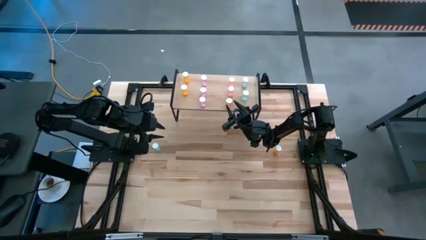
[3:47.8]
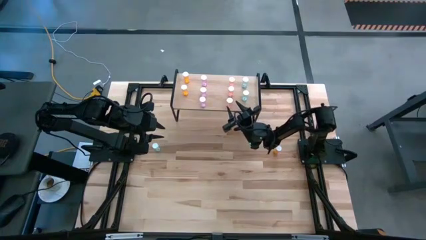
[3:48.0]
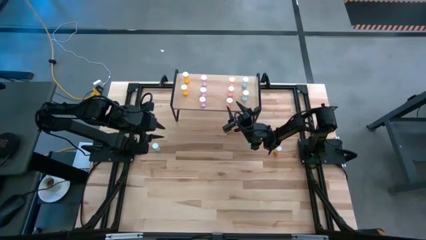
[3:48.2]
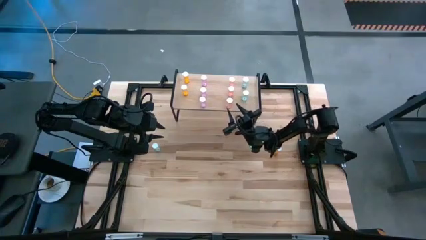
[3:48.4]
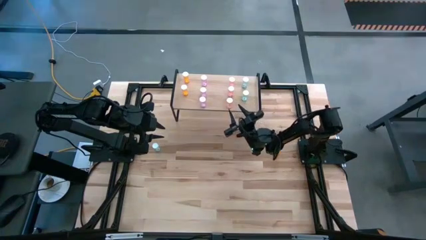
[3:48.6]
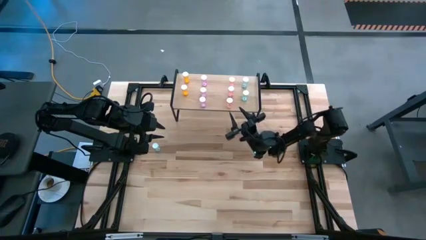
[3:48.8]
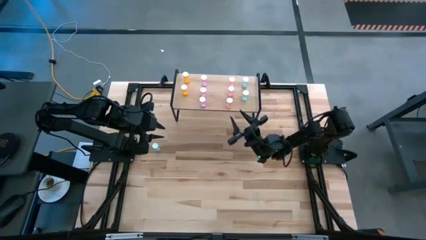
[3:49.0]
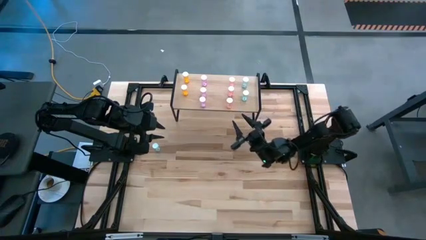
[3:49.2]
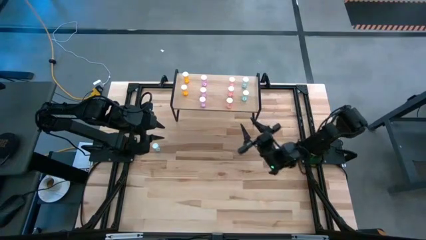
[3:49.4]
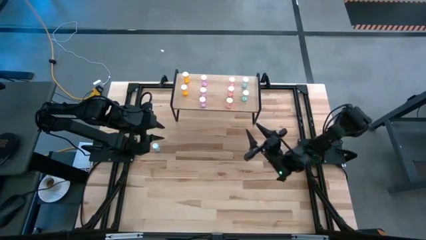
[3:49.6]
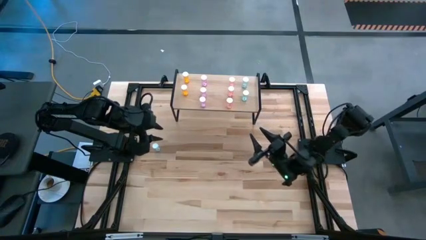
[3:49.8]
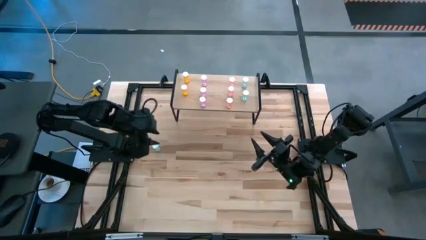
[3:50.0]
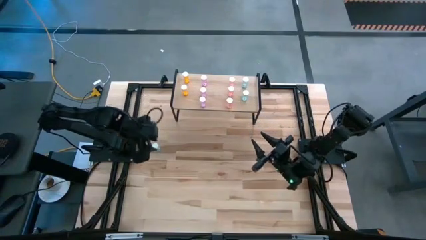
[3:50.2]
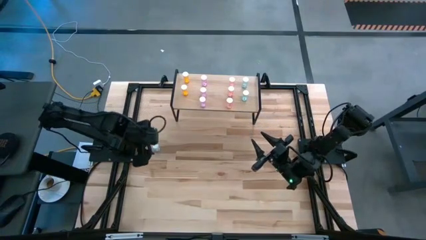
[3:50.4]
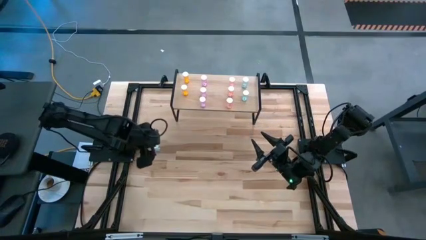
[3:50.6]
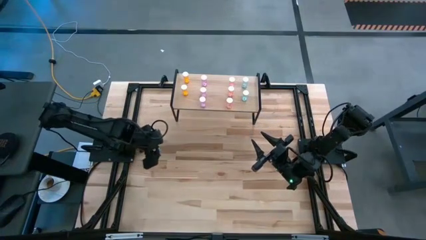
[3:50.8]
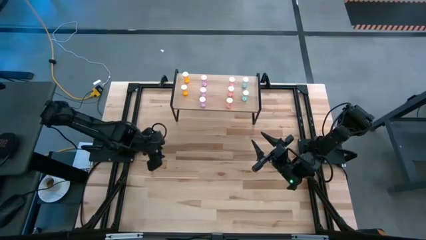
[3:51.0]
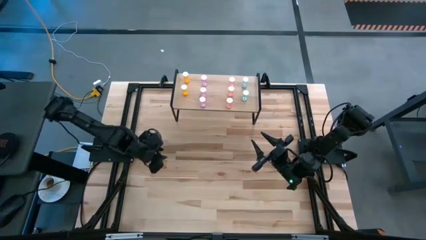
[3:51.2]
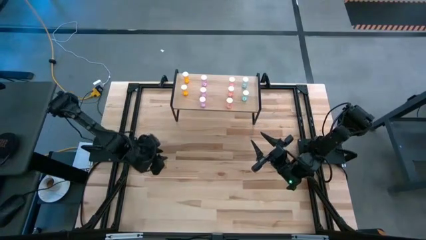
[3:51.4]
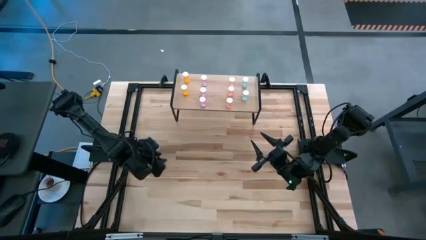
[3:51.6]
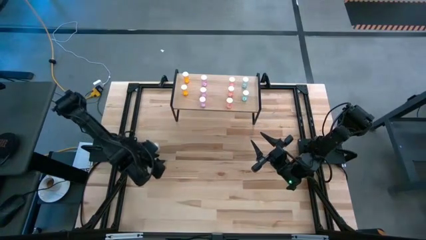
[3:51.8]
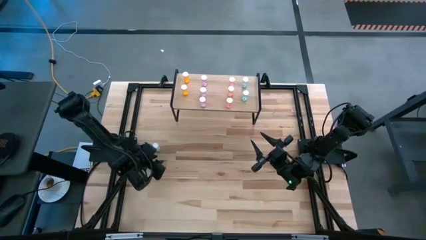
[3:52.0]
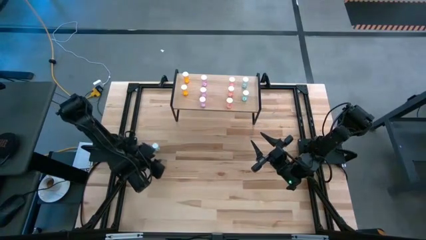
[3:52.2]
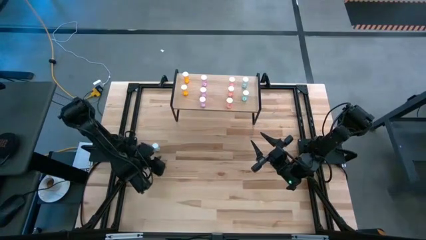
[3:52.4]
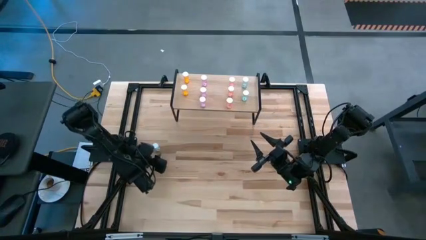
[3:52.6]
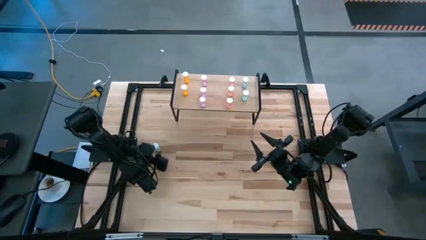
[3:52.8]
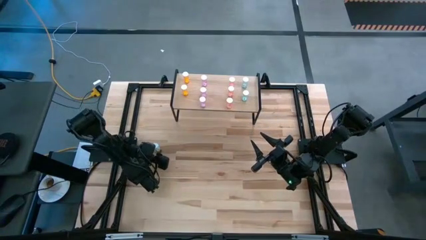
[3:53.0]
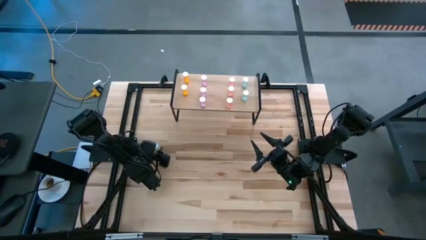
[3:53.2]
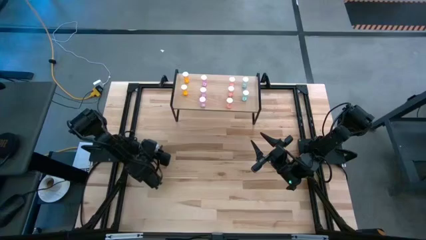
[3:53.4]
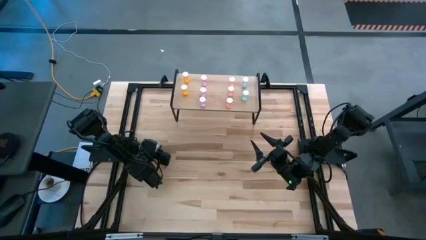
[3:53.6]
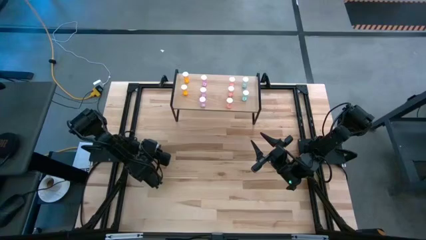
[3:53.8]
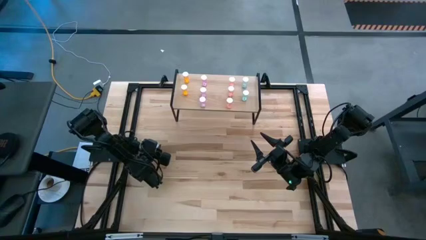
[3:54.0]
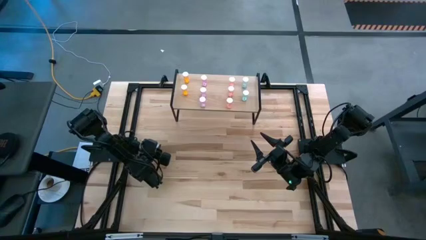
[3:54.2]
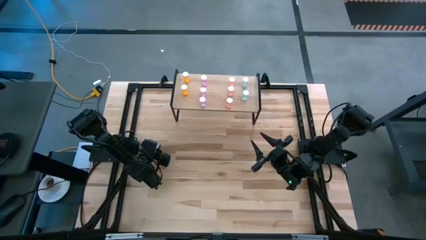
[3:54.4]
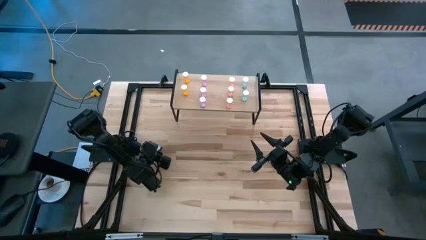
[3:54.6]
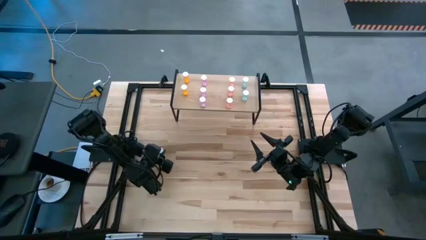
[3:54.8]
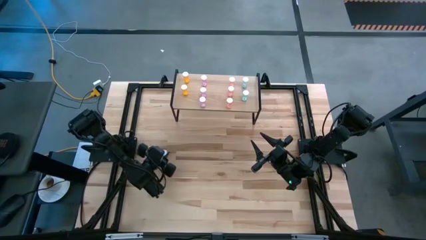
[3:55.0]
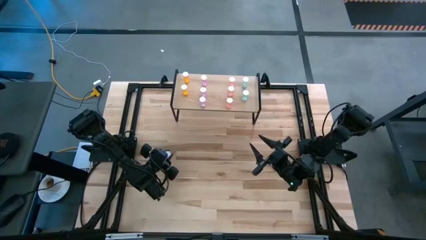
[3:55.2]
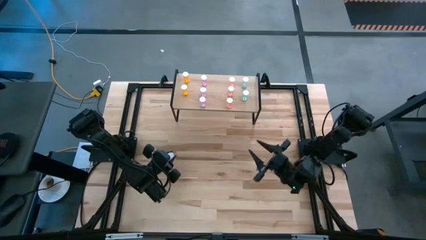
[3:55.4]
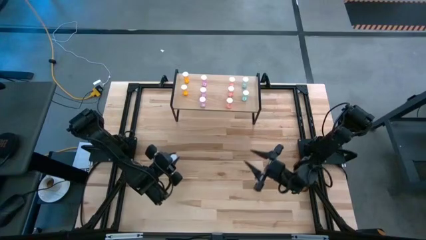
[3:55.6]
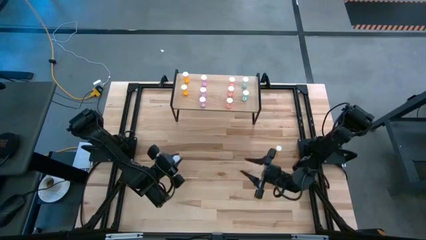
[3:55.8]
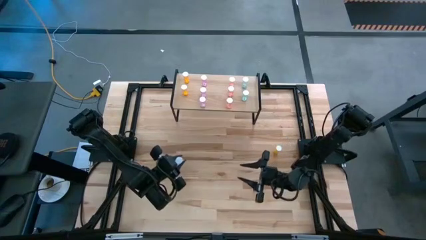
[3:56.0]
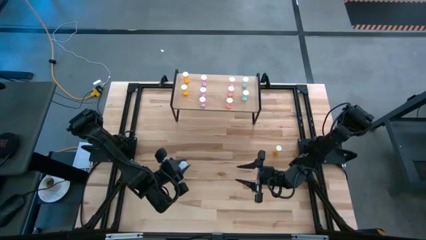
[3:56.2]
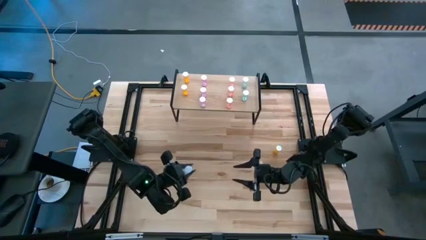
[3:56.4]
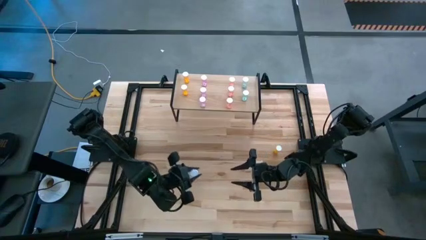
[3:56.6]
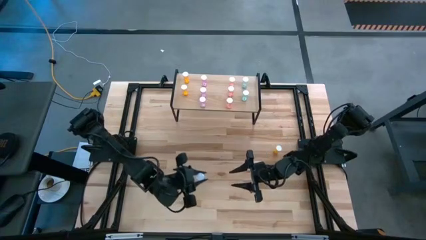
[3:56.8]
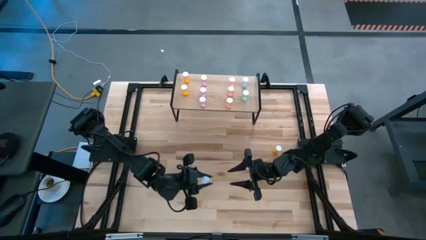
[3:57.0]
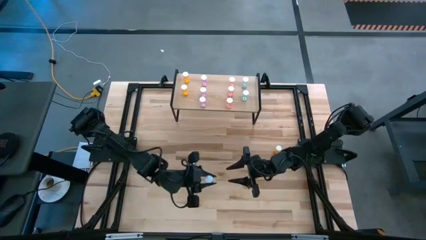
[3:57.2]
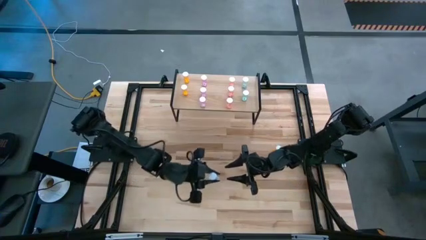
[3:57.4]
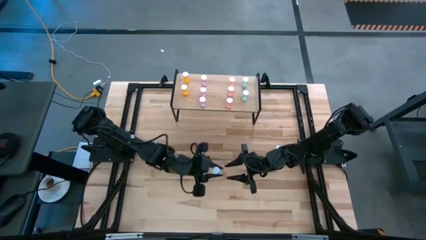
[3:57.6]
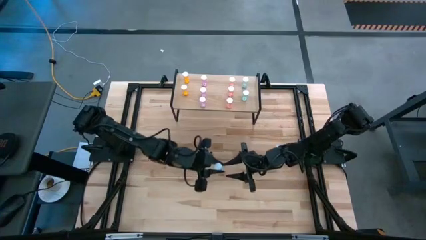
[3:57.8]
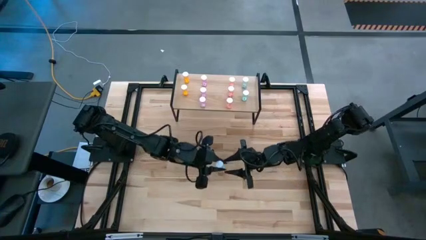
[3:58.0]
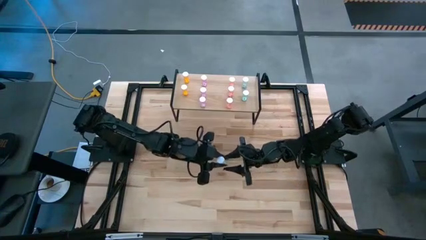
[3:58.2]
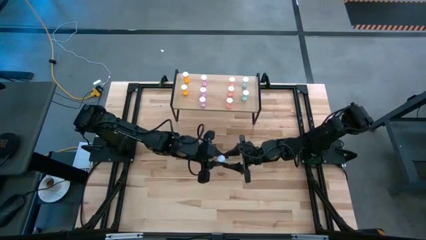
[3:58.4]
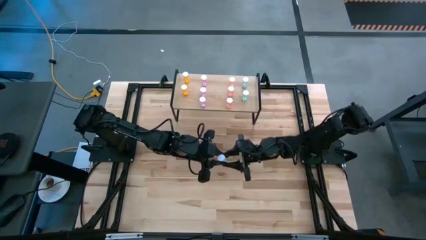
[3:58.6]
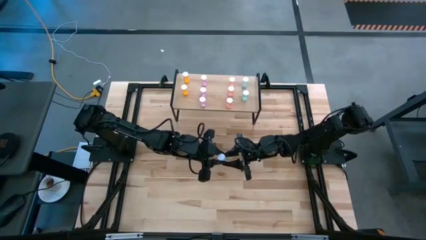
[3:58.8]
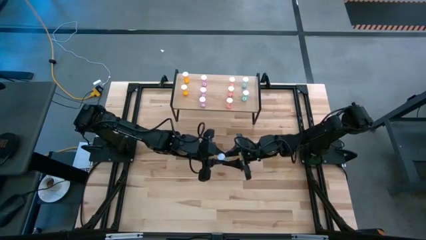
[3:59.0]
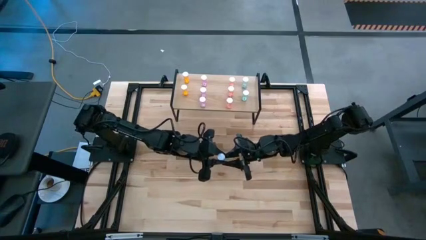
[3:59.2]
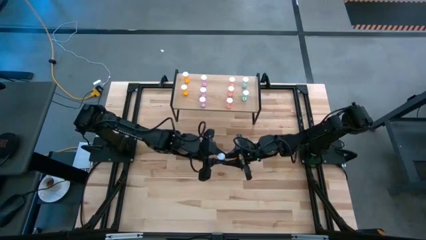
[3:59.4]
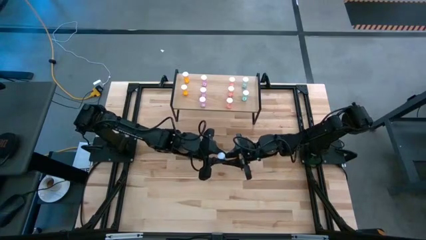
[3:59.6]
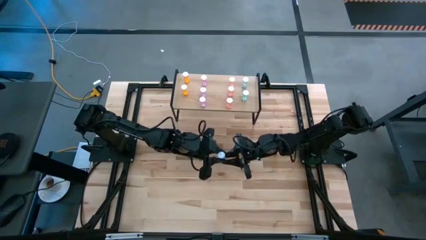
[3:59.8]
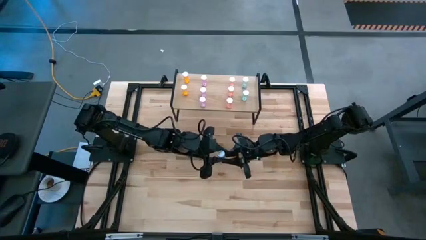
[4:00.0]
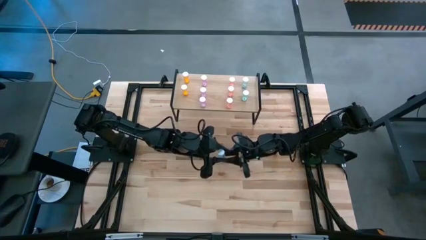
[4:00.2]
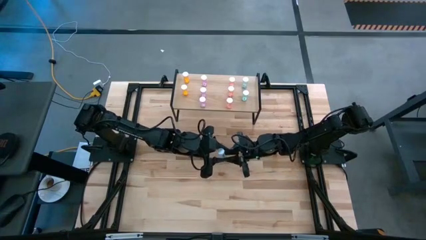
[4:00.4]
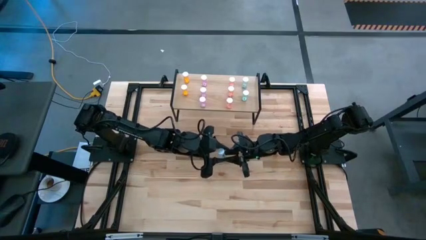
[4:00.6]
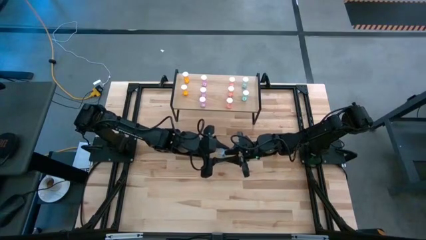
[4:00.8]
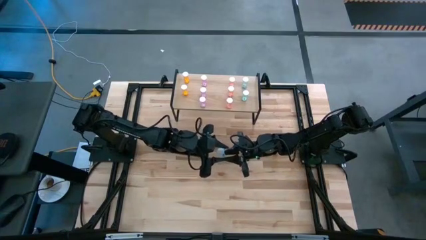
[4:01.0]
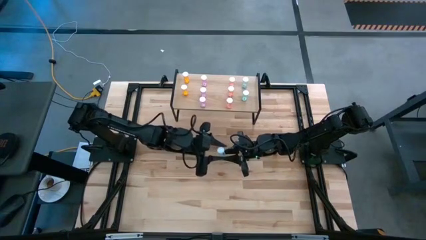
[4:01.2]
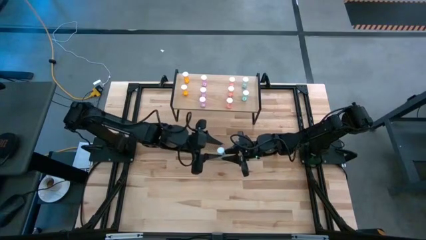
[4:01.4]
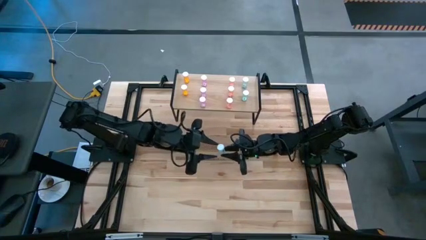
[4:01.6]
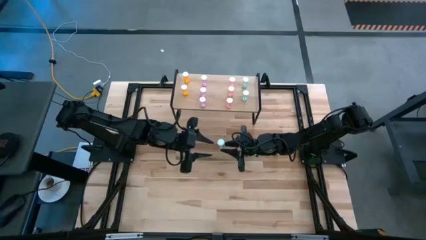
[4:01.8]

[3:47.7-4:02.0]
Task: Pick and place medicine bottles onto shelf by color
Put the blue pill bottle on the shelf aligned with other blue pill bottles
